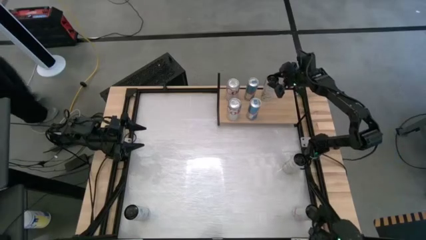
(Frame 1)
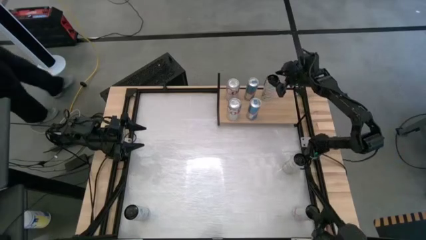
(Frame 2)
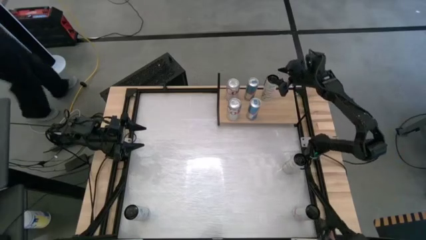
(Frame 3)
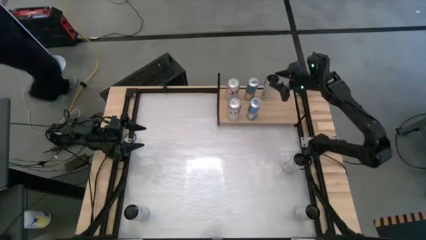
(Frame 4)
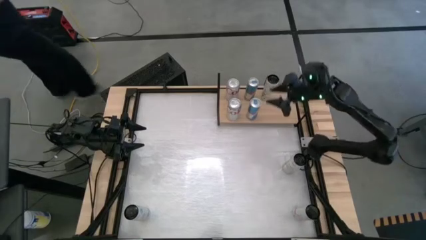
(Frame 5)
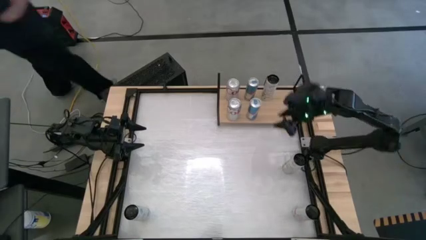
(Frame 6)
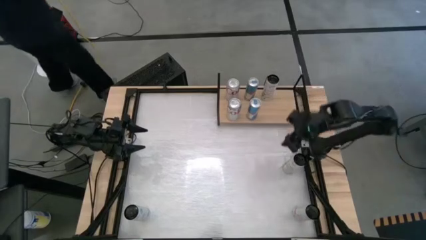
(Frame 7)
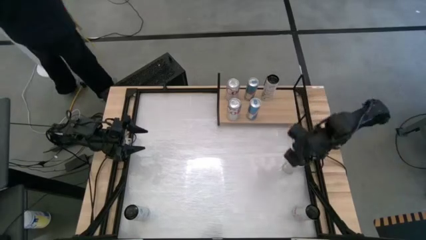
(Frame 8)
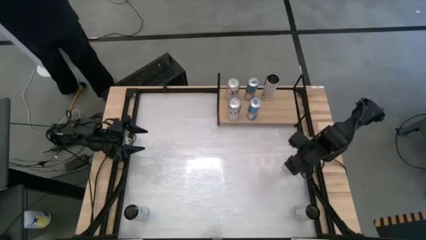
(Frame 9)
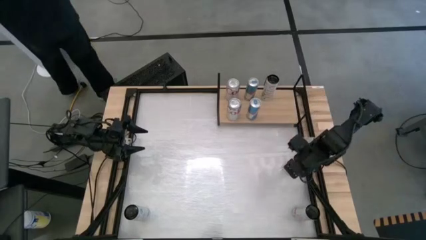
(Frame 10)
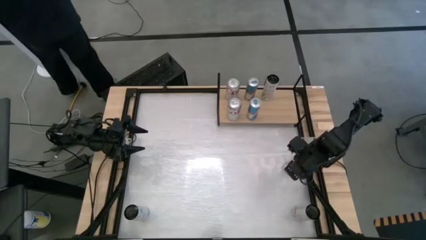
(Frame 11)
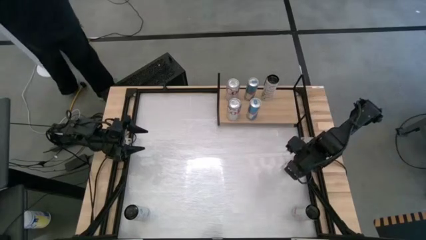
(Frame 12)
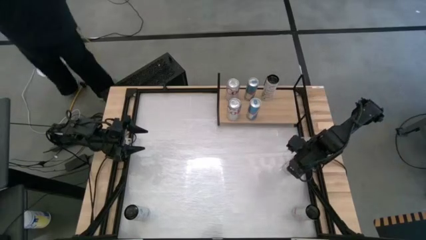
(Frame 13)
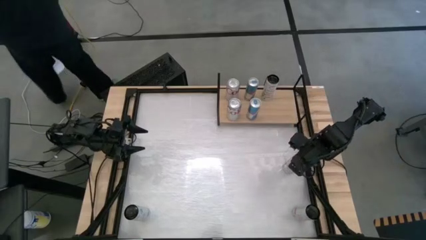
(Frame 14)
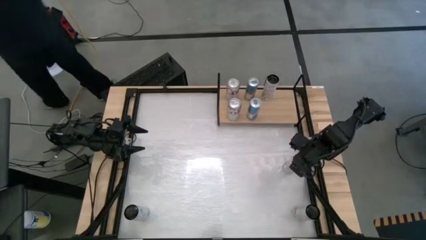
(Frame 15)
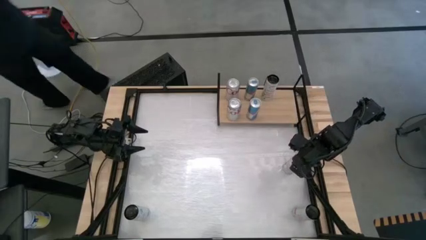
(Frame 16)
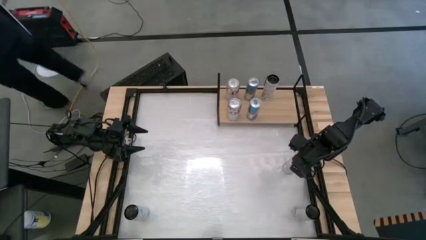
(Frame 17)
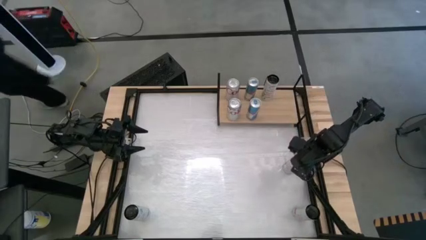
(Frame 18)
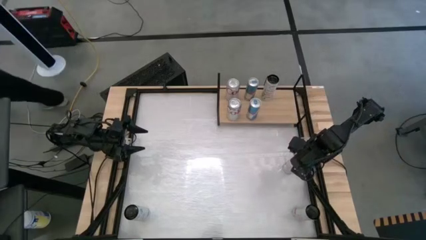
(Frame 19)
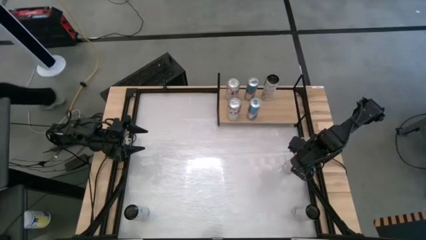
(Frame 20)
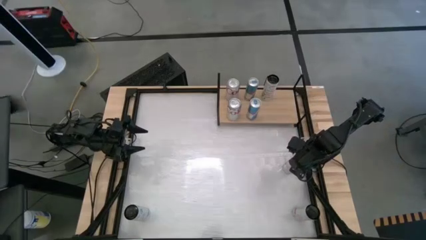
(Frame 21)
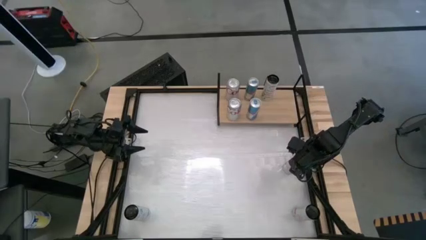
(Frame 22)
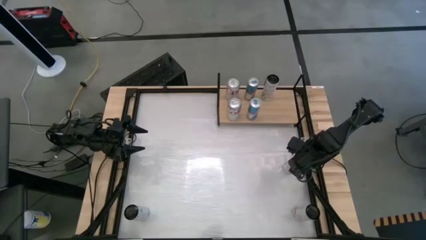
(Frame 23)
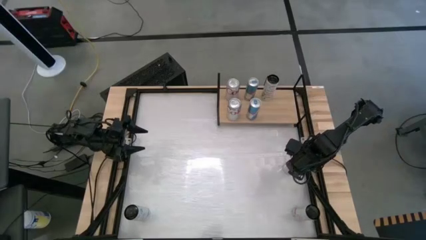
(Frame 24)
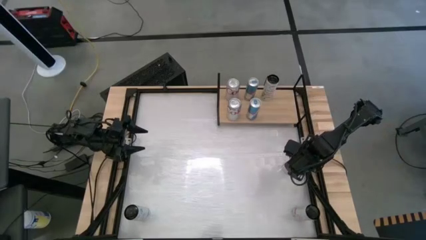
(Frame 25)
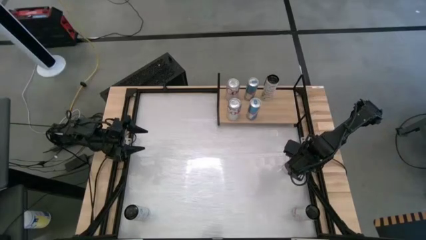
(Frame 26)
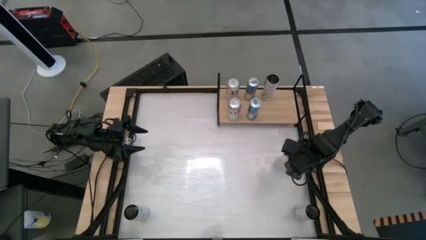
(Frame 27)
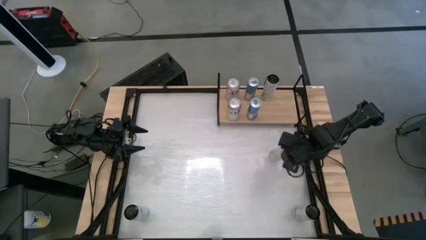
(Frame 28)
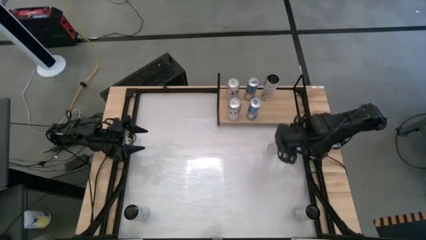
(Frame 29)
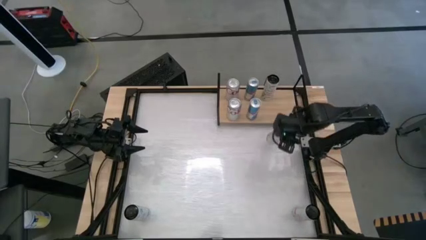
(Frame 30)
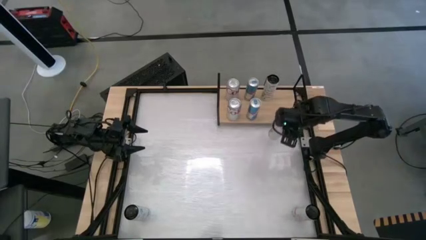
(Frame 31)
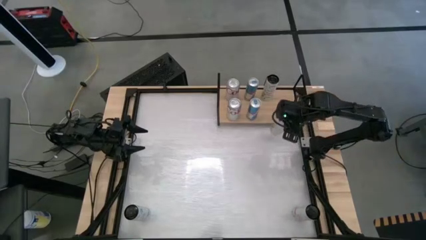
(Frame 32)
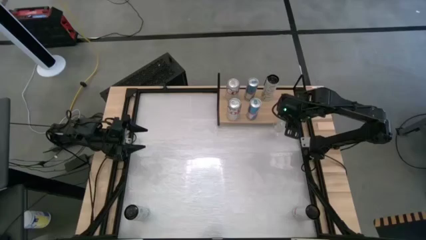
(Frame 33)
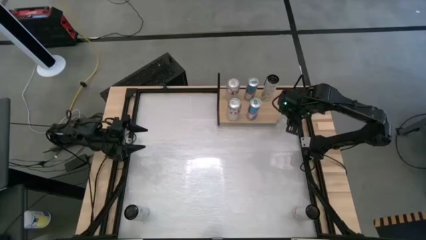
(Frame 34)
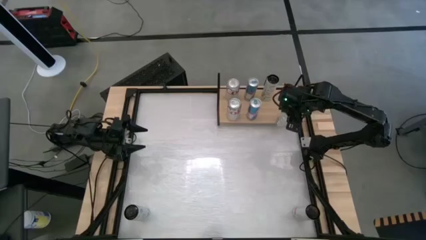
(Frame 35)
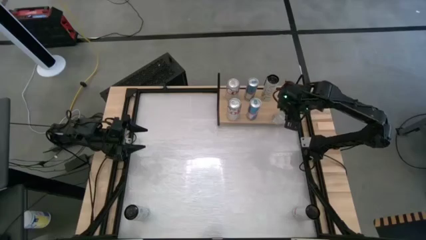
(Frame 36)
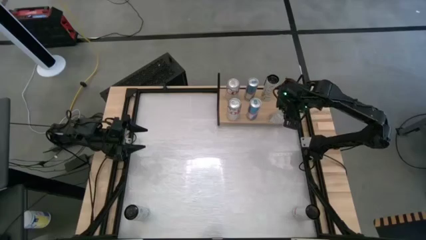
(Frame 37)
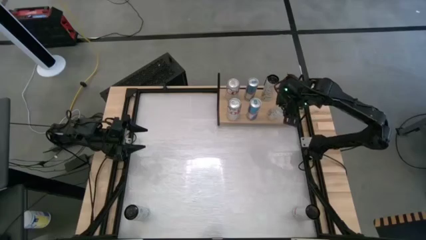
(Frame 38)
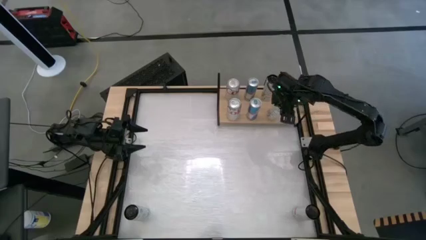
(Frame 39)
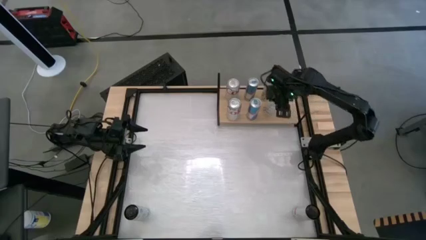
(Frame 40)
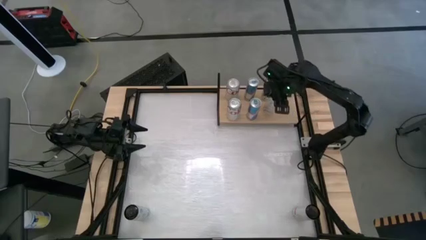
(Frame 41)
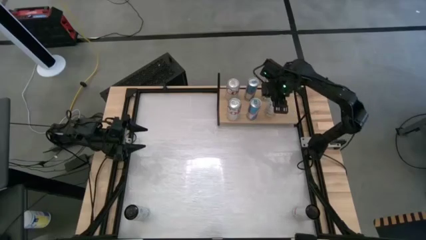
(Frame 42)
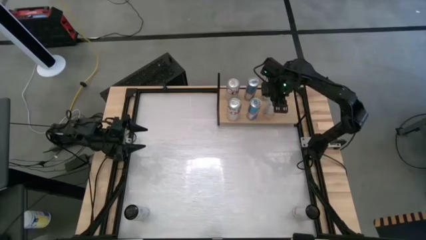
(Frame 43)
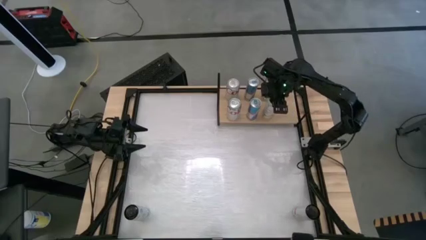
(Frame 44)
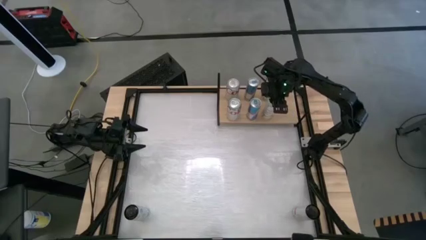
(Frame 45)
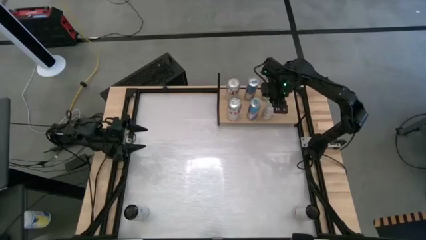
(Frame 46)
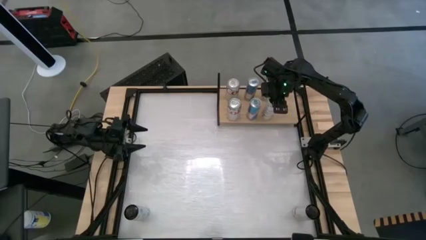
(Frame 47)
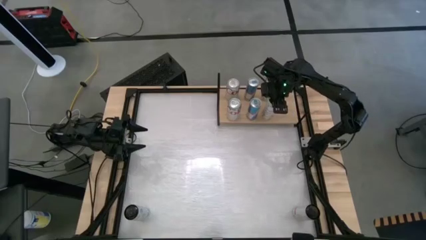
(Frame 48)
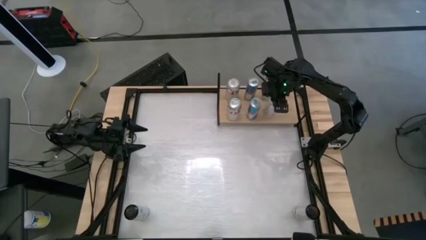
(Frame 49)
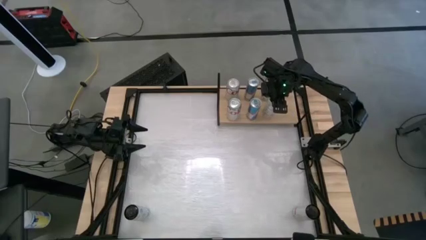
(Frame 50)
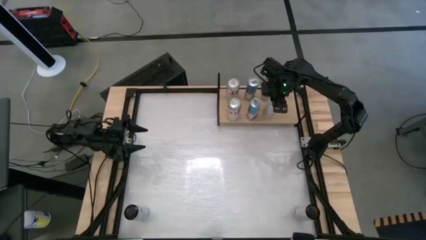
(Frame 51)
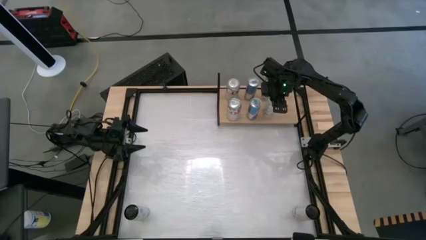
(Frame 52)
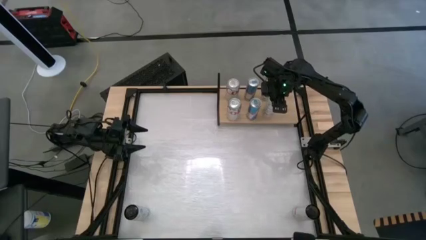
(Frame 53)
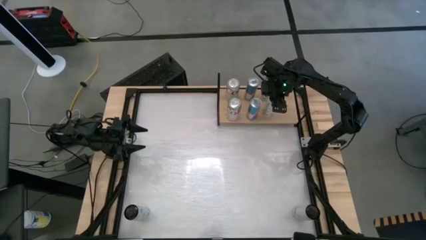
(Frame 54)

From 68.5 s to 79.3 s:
Task: Place canned beverage on shelf
Put the top right black can on the shelf

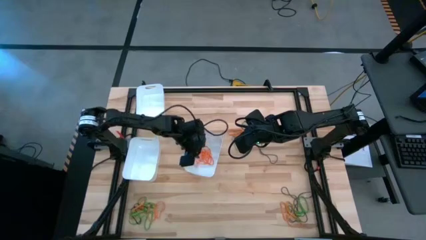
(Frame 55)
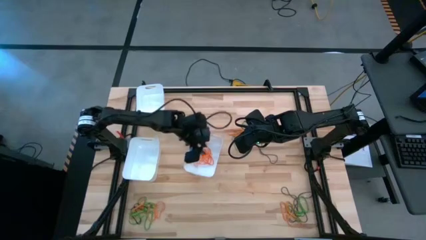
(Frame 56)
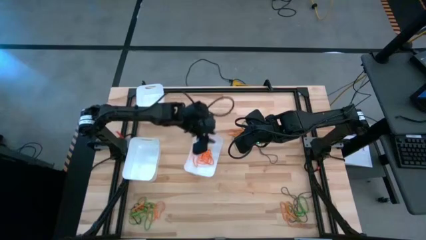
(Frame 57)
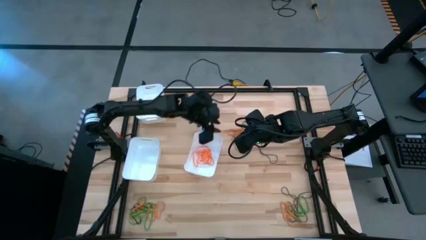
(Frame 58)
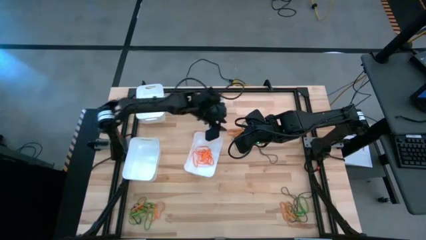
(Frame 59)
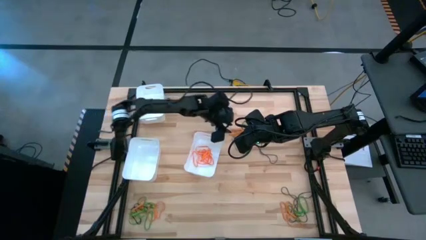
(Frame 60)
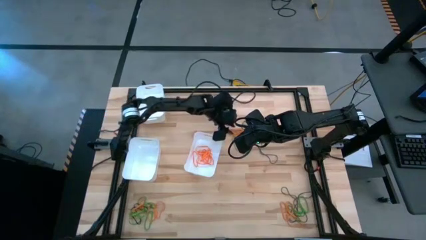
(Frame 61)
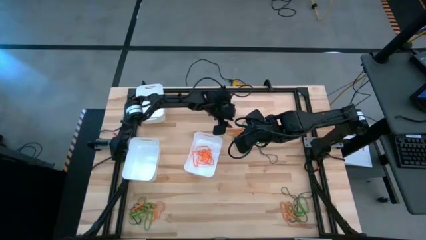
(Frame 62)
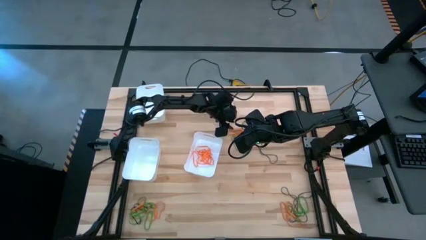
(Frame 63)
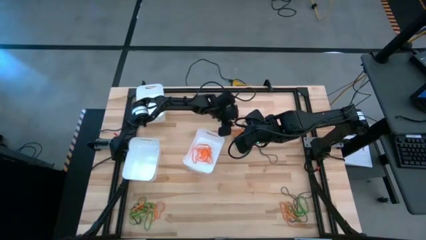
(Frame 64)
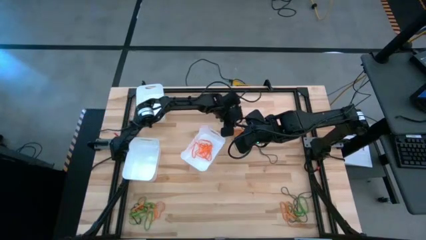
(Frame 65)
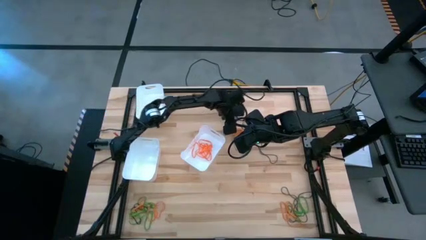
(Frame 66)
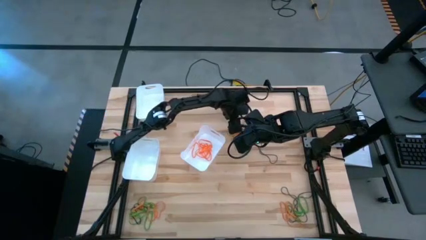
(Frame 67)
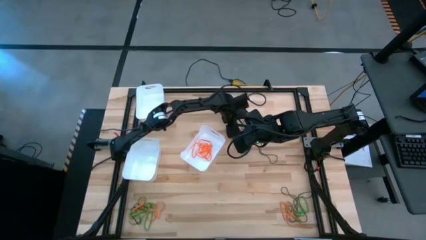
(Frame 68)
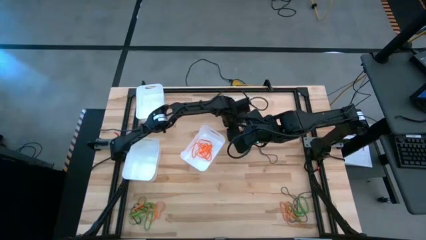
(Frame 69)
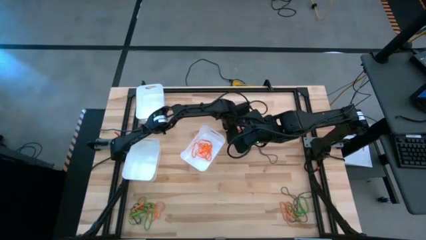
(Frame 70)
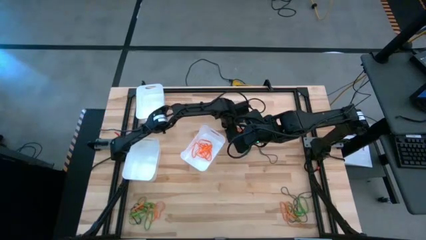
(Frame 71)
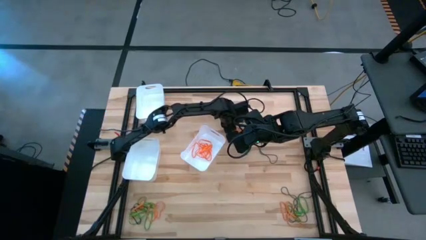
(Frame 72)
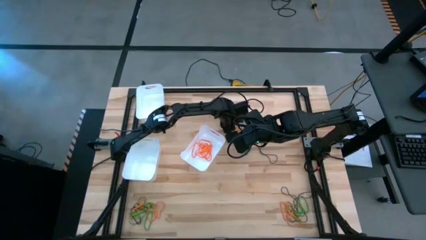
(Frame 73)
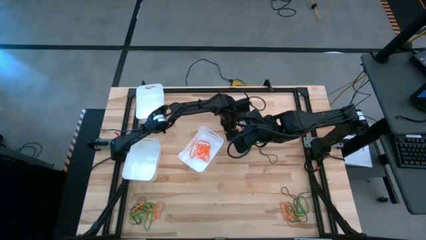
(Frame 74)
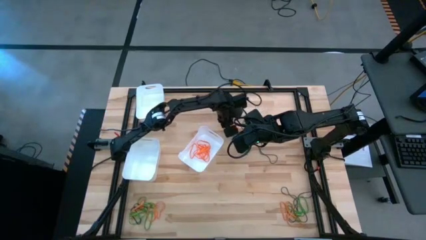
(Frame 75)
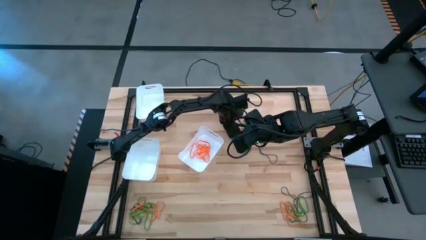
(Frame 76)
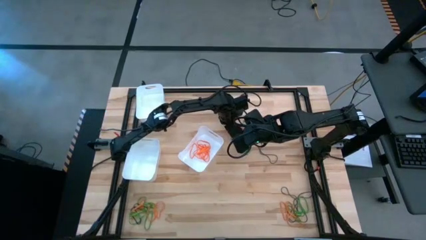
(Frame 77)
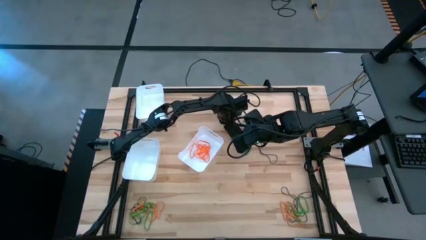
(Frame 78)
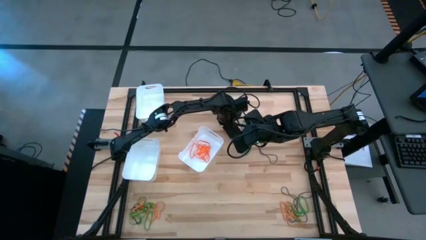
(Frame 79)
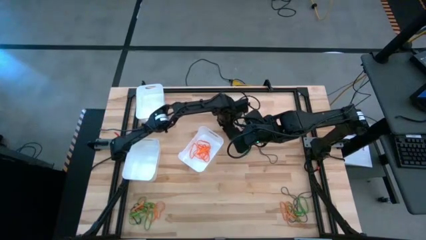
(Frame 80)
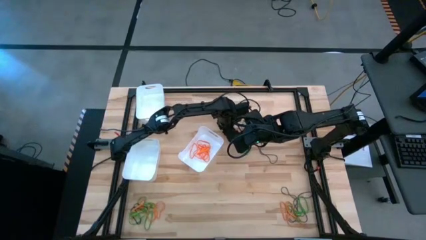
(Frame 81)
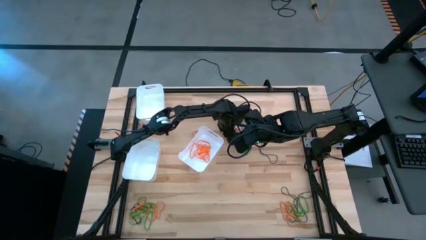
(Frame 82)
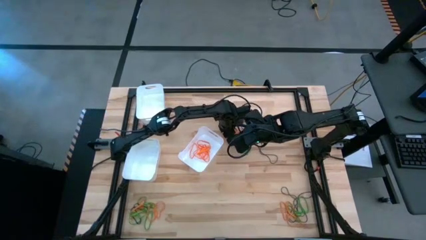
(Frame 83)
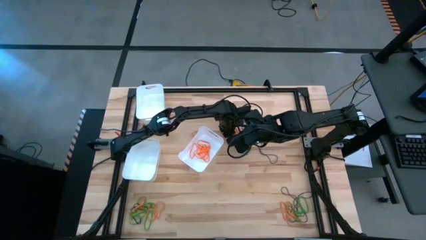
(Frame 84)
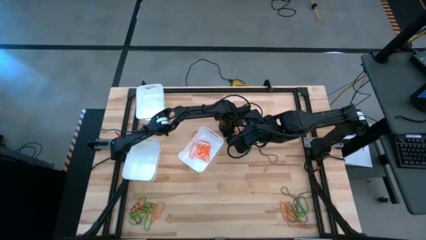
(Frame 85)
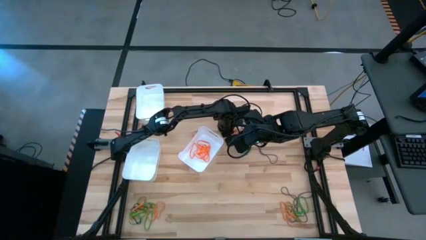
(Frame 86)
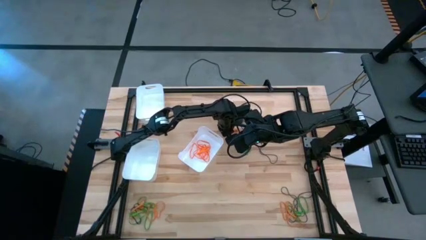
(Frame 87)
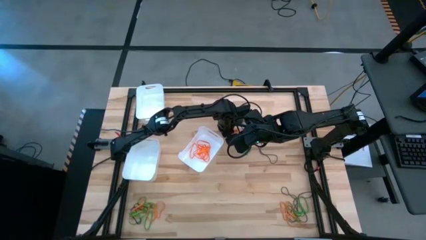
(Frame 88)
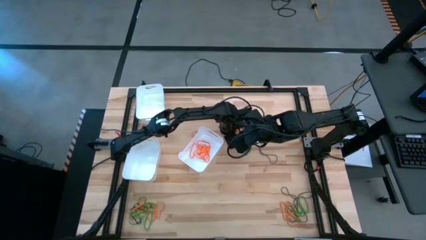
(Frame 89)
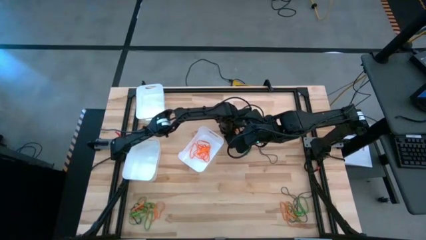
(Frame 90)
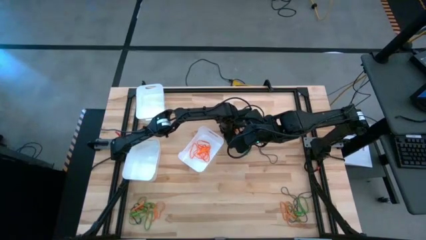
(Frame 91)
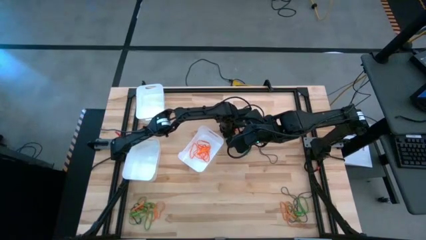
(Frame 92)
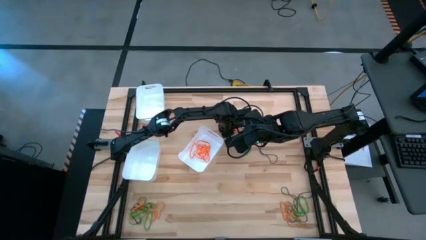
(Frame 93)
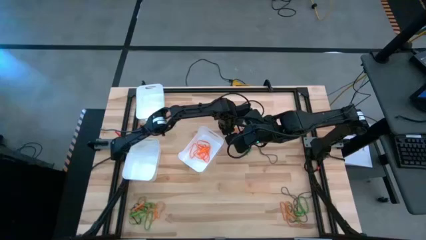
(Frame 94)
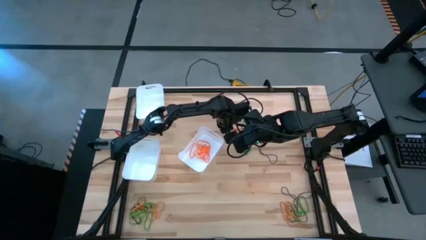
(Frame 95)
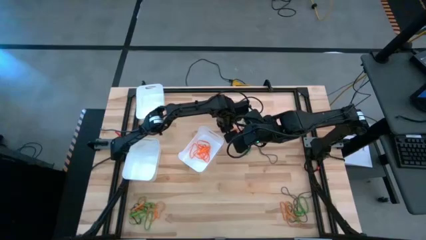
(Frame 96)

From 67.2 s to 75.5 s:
Task: Sort rubber bands into baskets
Put the orange rubber band into the bottom right white bin
